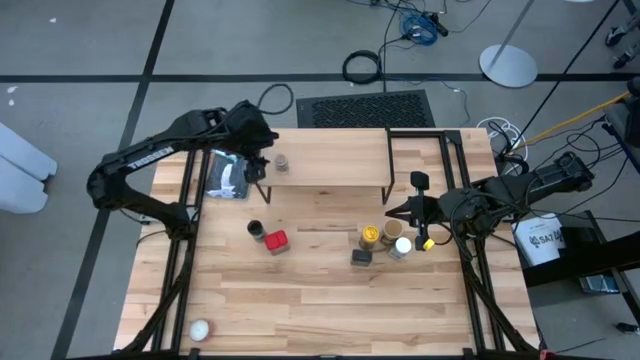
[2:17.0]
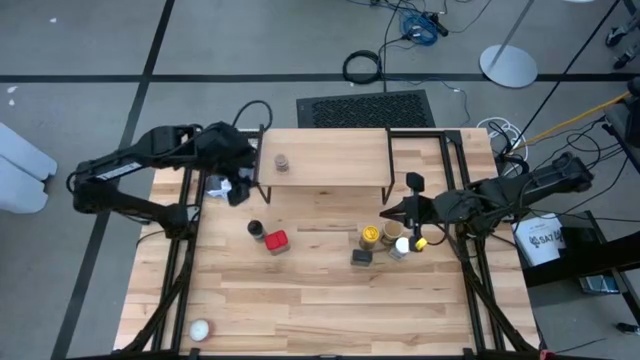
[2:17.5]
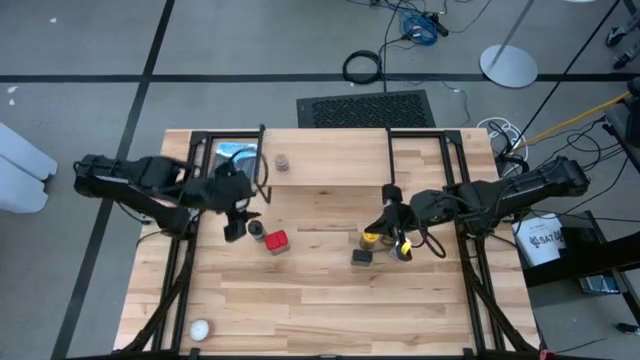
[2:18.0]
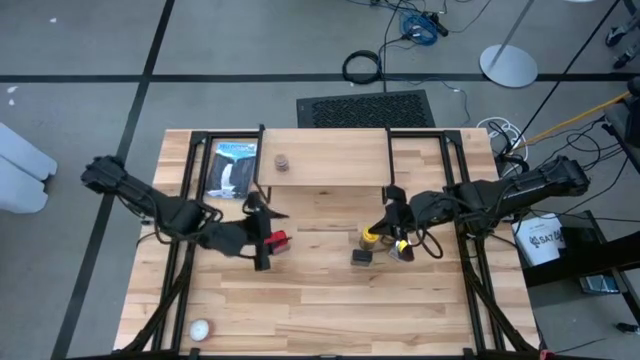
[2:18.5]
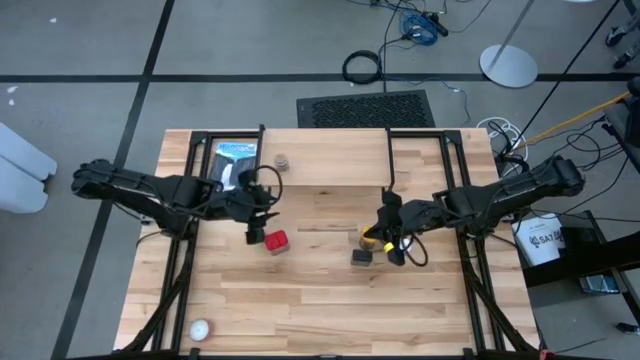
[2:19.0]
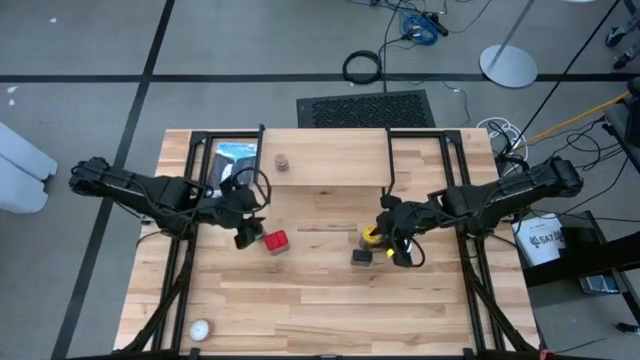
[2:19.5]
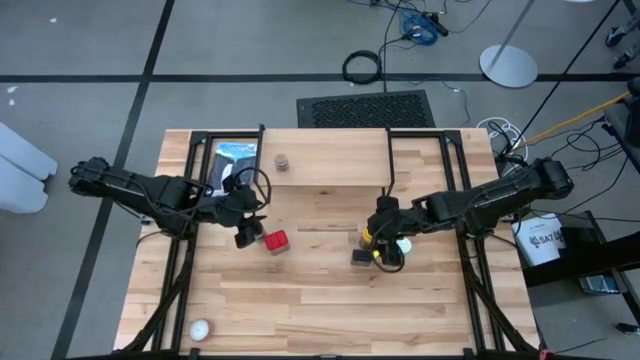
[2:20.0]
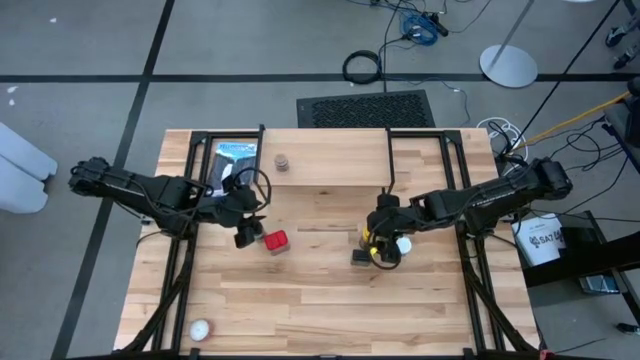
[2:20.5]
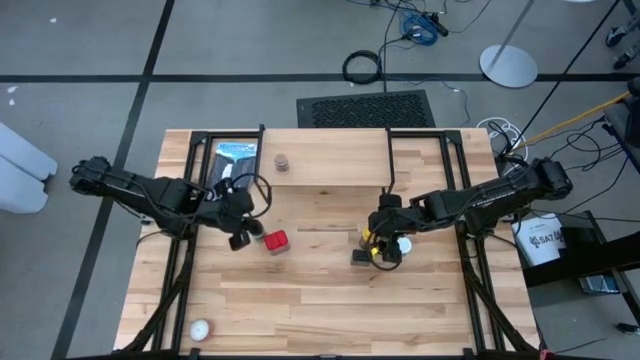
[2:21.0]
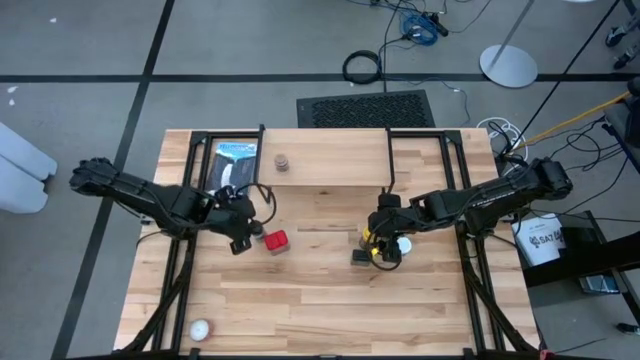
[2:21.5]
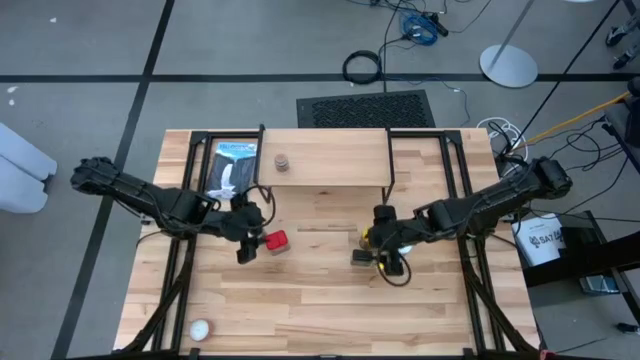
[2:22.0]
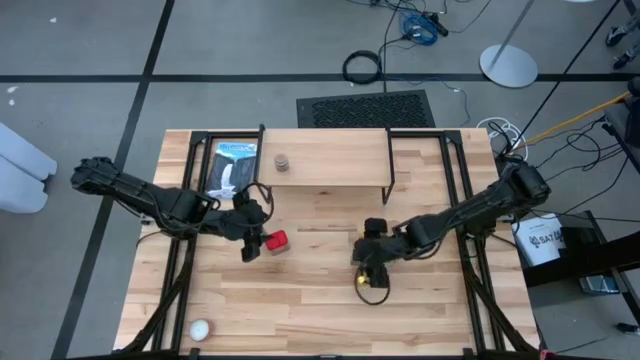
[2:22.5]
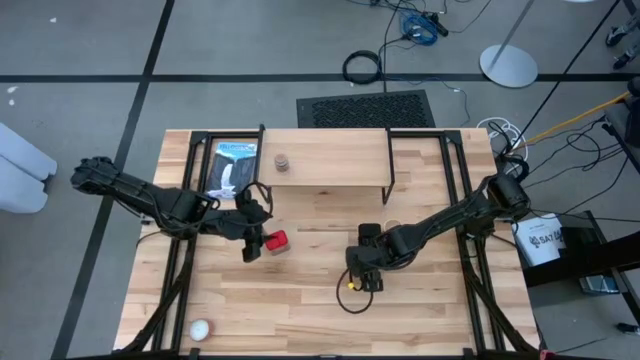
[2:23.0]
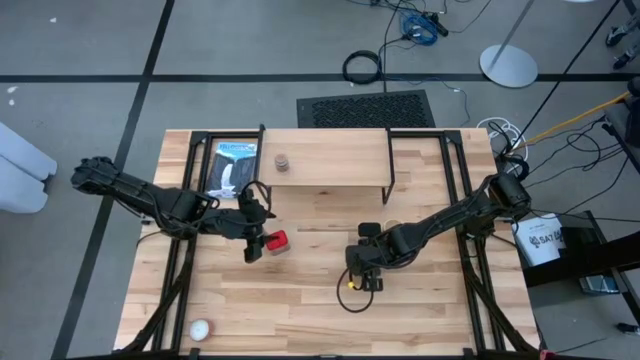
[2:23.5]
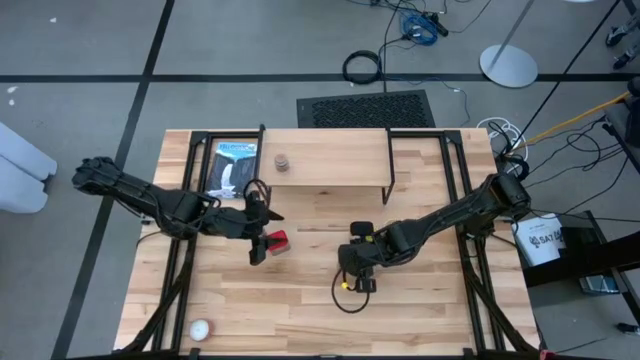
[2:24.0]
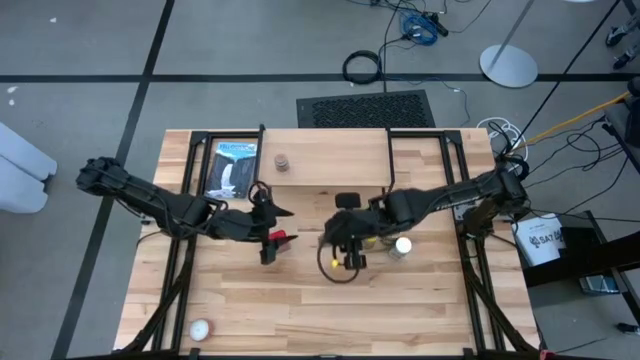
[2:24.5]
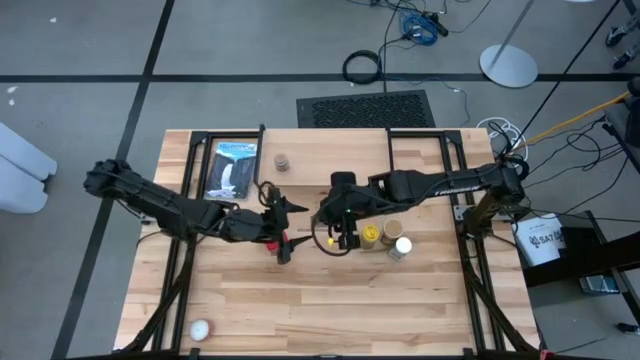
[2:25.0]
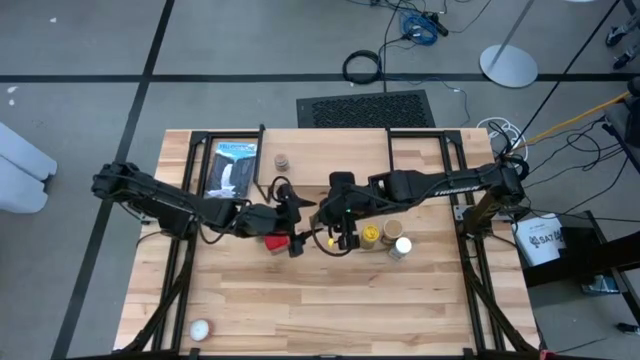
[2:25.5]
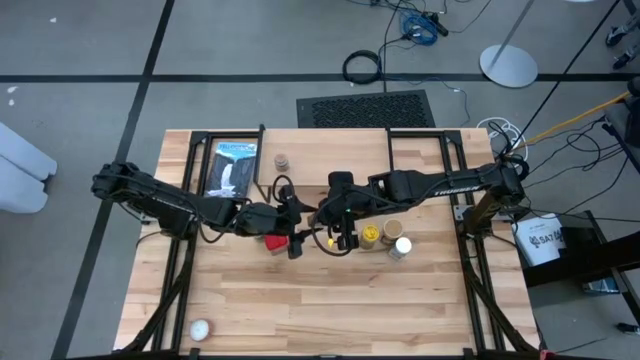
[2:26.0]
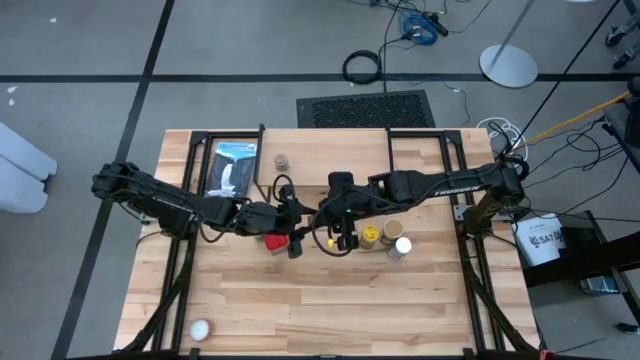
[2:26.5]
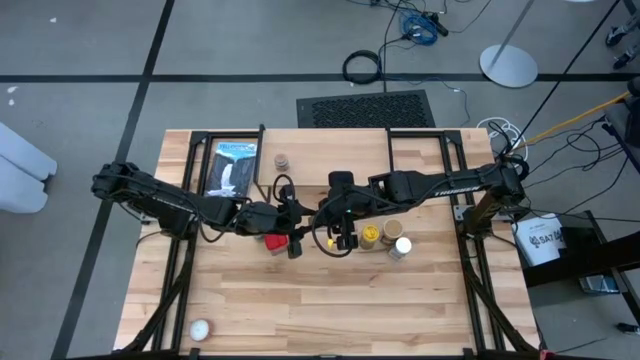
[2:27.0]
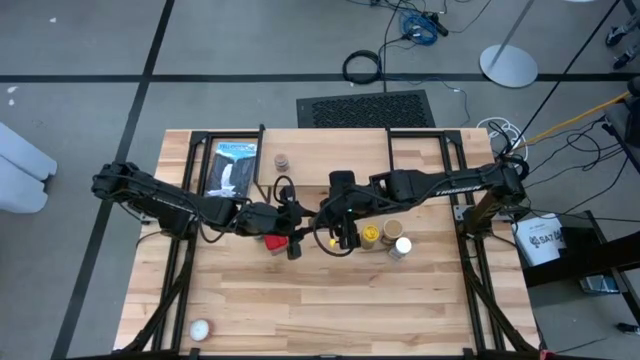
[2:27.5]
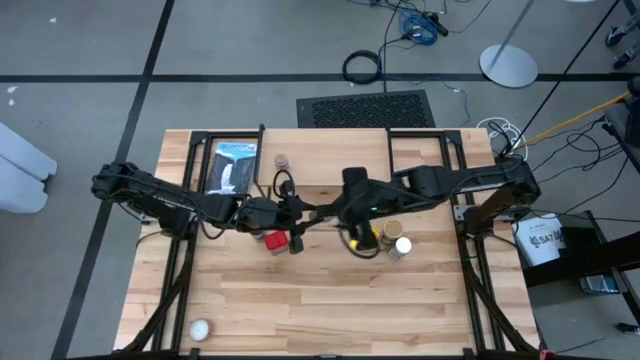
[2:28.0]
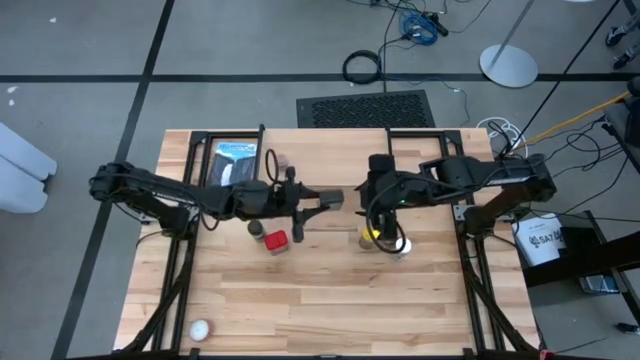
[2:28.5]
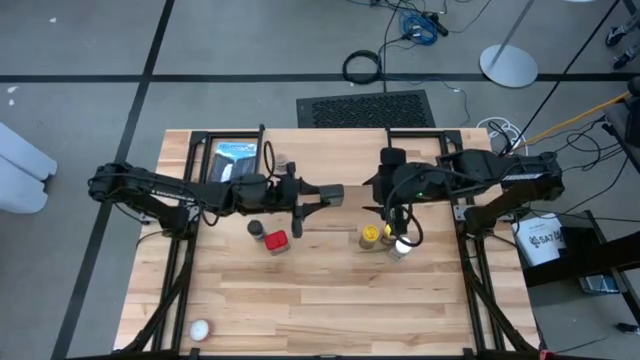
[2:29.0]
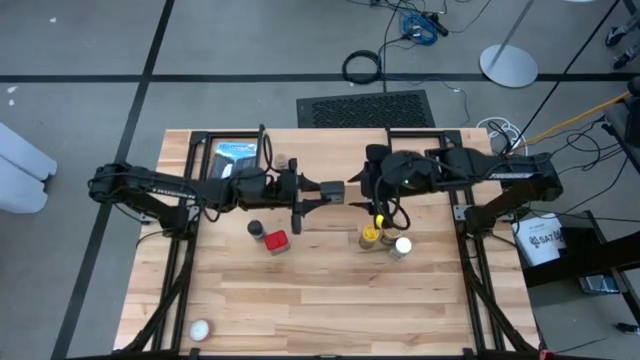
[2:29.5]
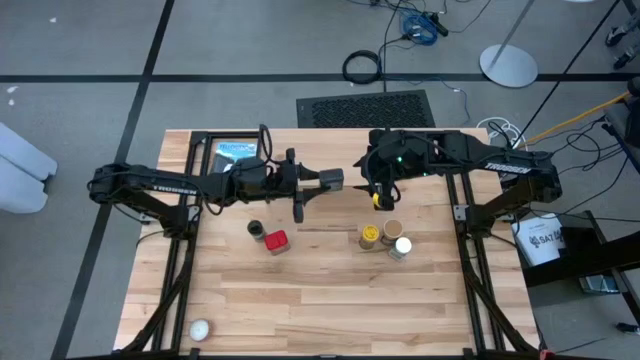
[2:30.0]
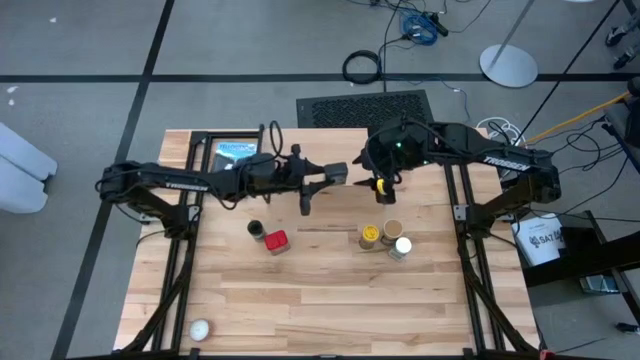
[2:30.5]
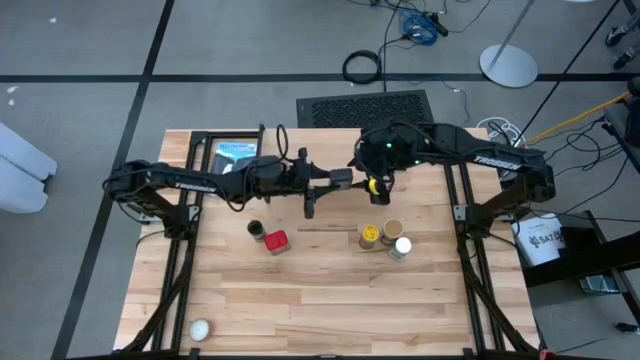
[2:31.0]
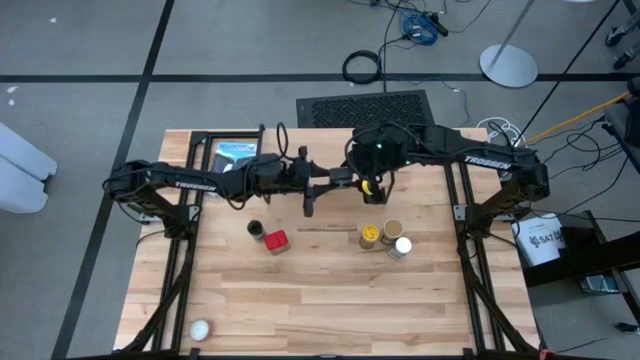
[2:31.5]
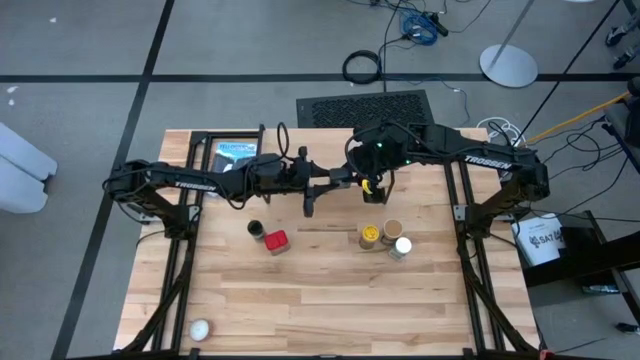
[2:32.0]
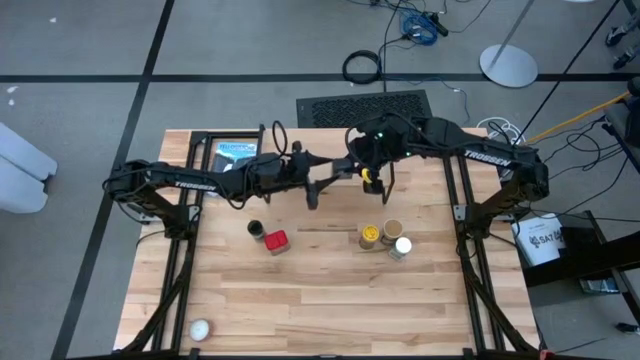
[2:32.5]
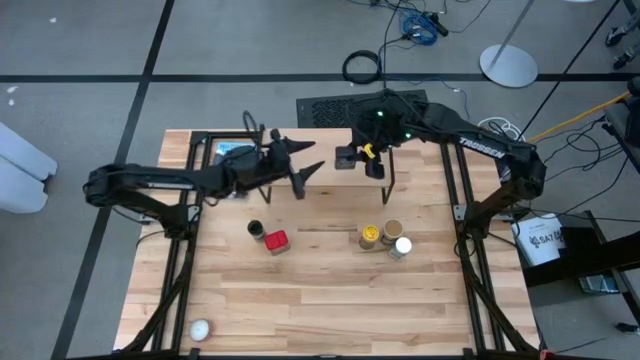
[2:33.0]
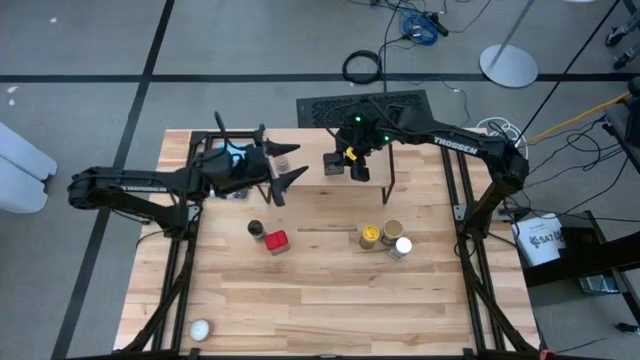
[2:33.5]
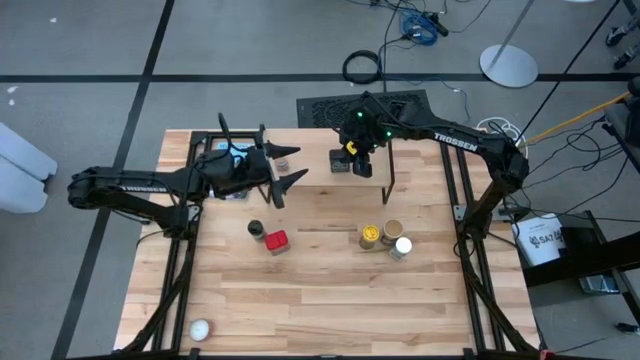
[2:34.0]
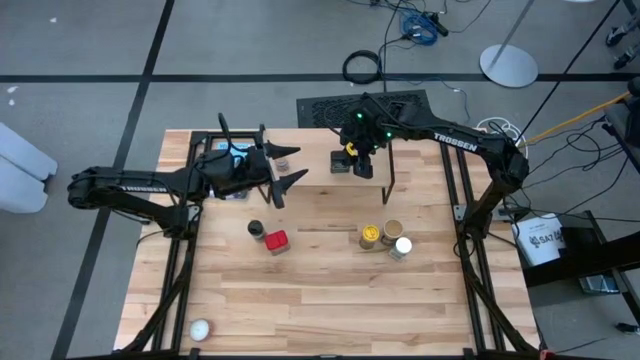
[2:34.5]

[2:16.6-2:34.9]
Task: Shelf spices
Put the black seasoning can on the shelf

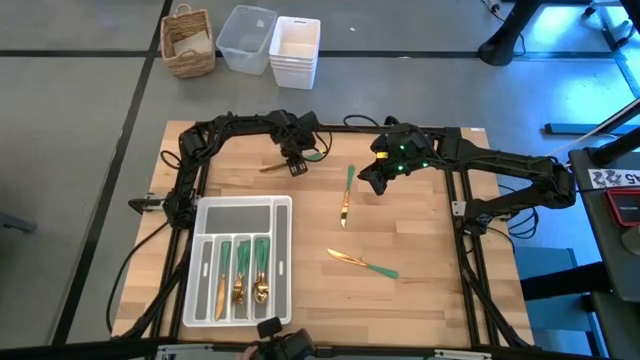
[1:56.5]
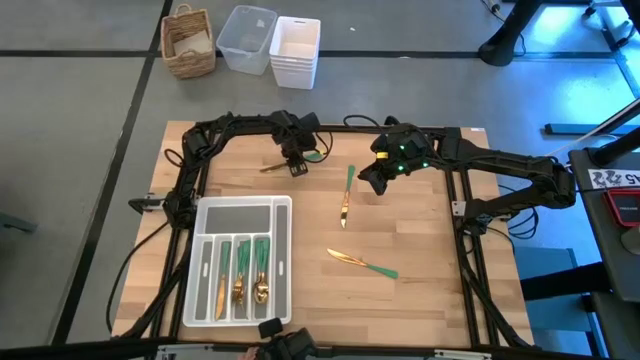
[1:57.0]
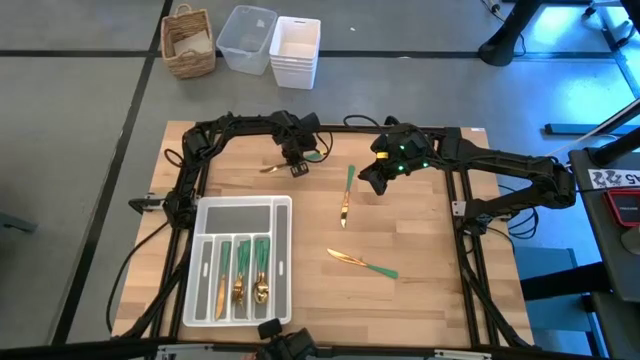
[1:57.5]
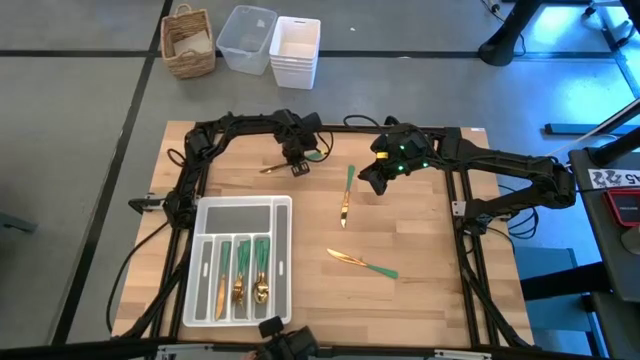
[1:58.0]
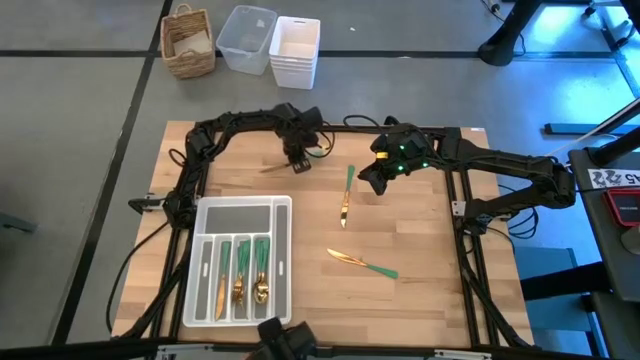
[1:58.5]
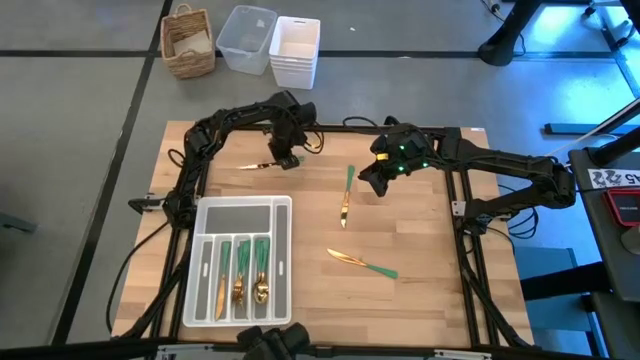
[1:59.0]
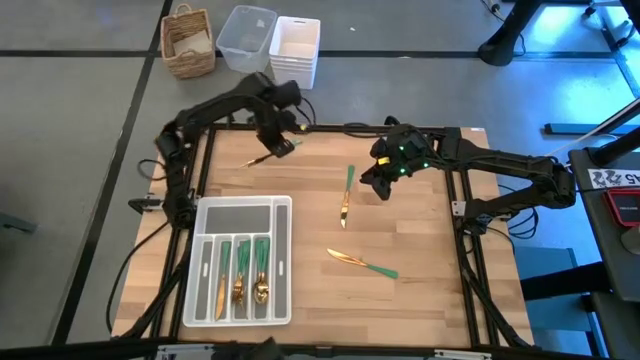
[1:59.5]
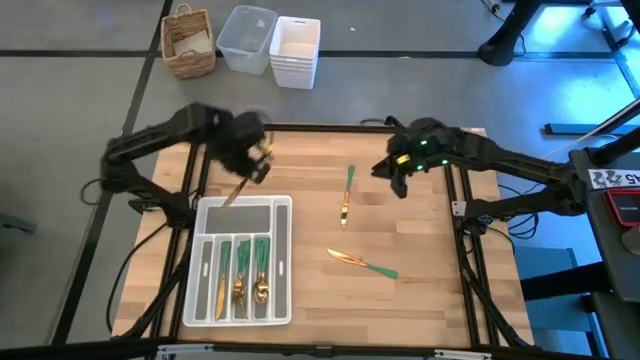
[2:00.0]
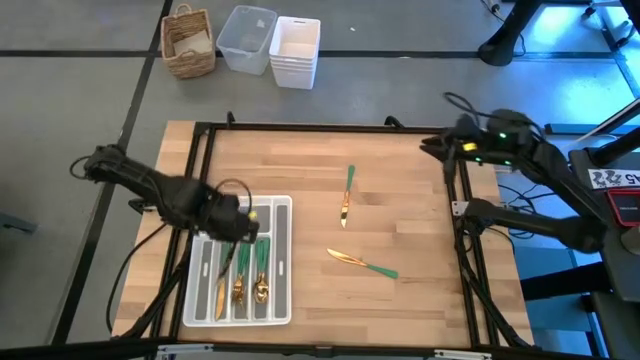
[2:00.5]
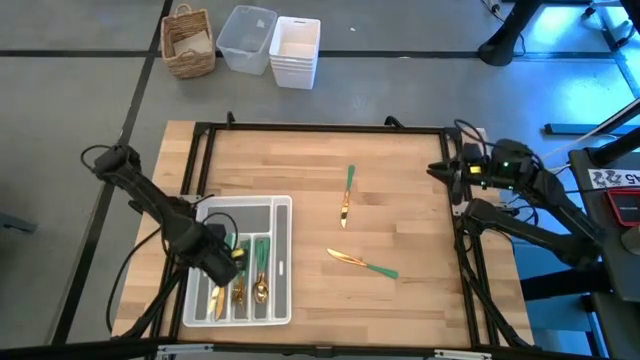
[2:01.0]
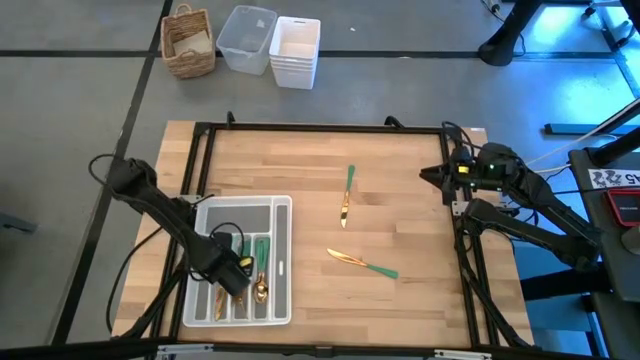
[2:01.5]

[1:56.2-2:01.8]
Task: Sort silverware
Put the green knife on the silverware tray
